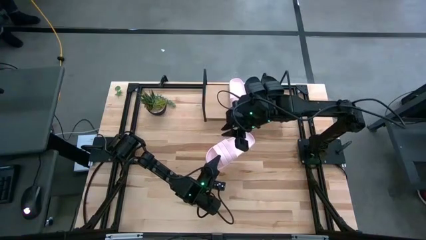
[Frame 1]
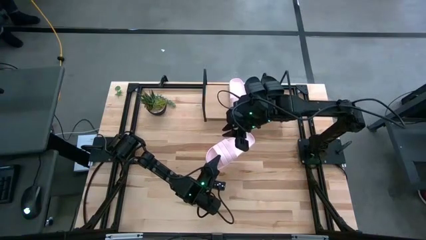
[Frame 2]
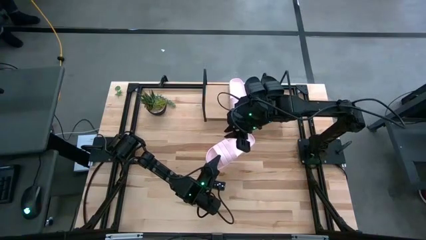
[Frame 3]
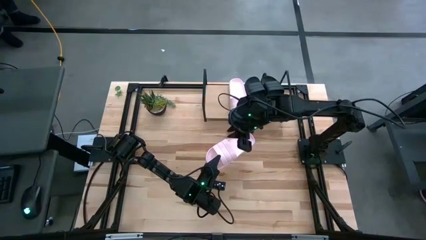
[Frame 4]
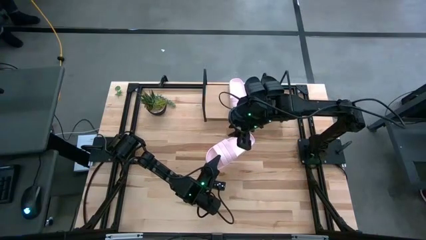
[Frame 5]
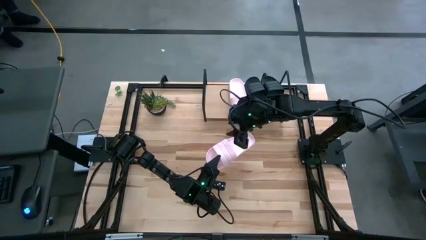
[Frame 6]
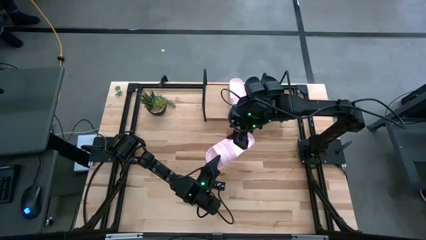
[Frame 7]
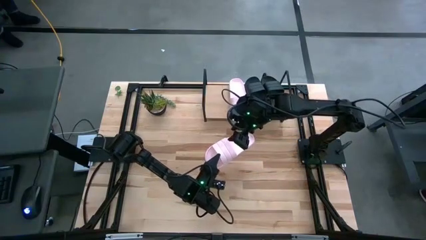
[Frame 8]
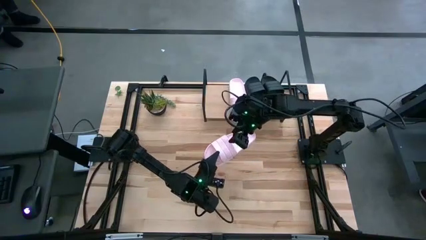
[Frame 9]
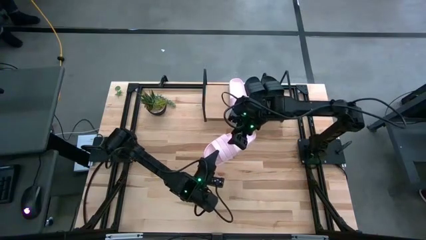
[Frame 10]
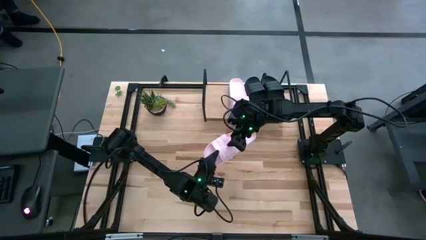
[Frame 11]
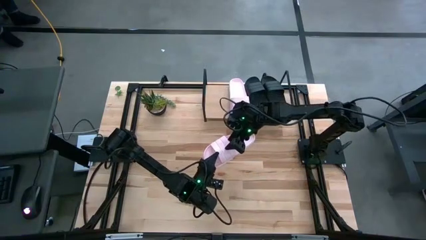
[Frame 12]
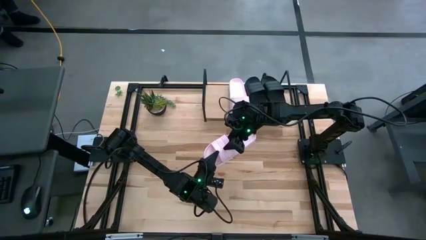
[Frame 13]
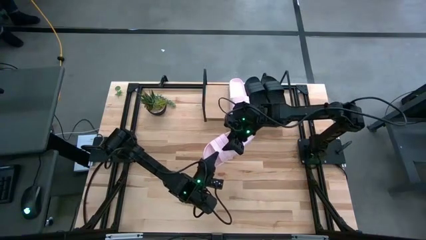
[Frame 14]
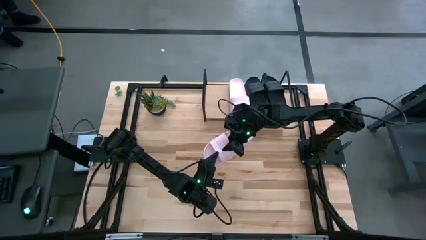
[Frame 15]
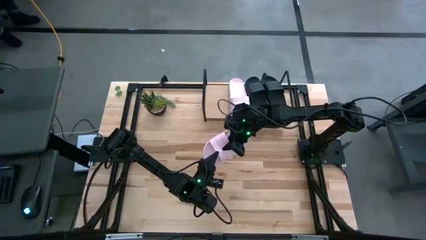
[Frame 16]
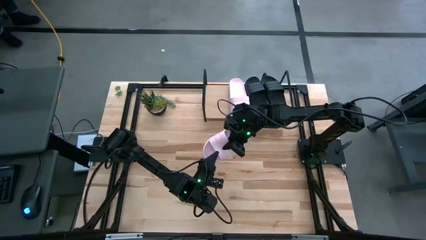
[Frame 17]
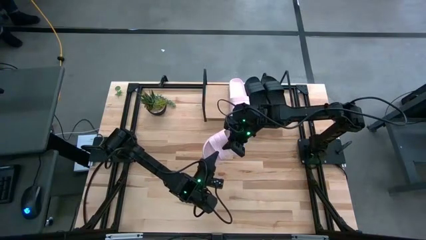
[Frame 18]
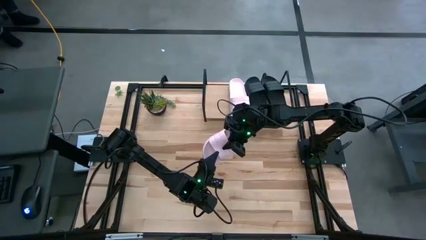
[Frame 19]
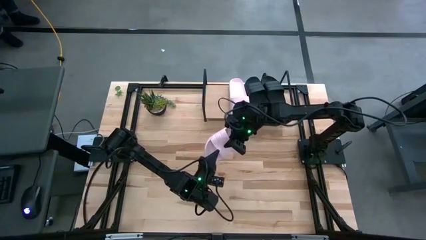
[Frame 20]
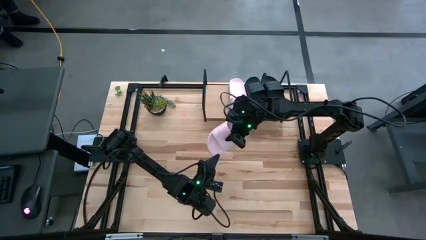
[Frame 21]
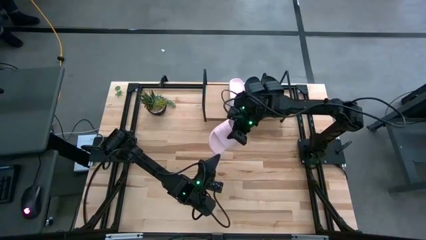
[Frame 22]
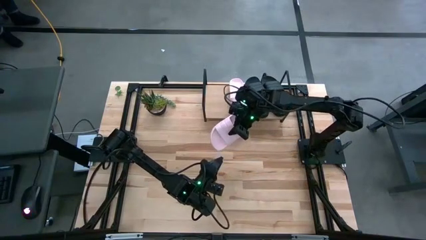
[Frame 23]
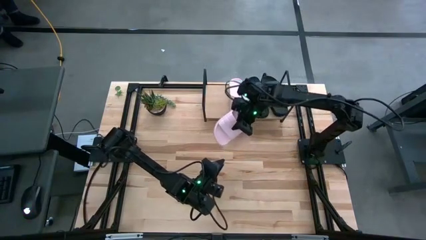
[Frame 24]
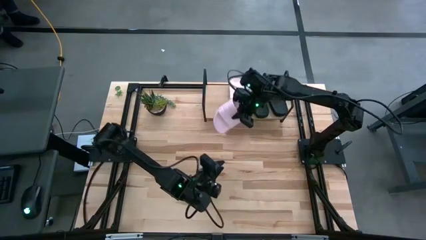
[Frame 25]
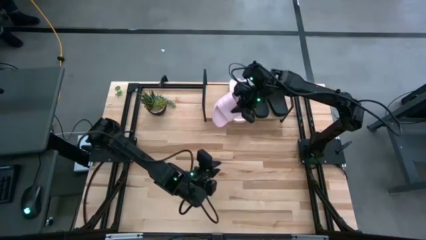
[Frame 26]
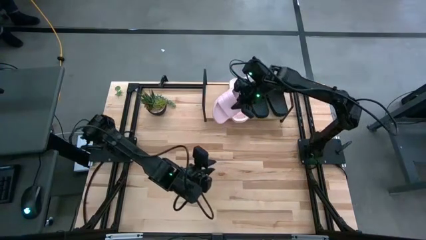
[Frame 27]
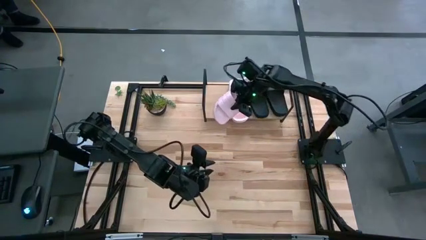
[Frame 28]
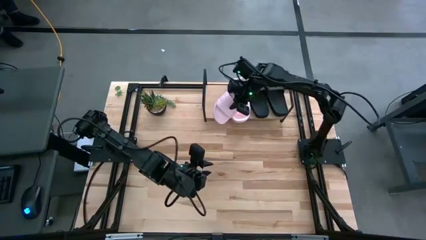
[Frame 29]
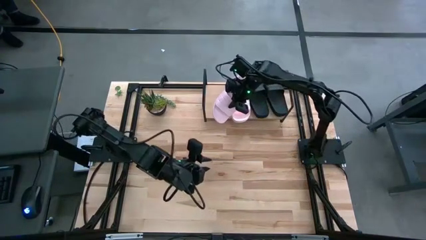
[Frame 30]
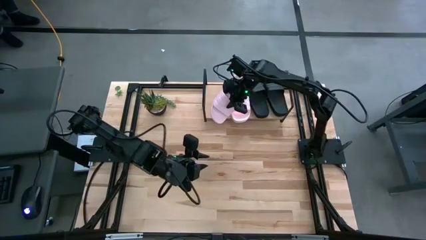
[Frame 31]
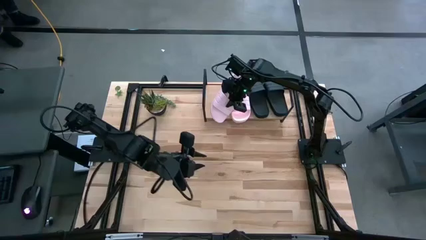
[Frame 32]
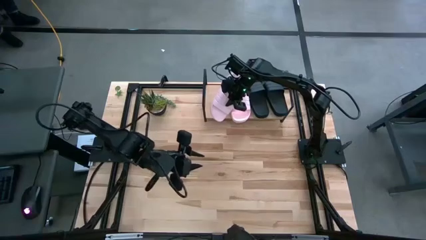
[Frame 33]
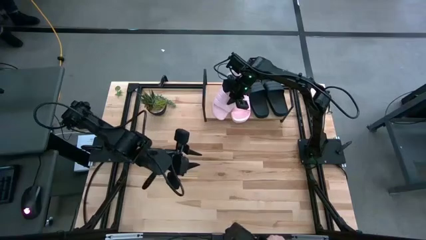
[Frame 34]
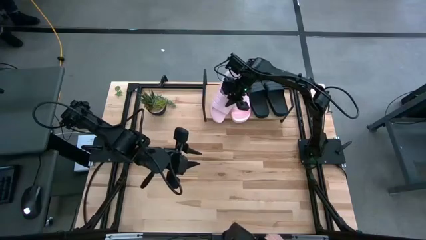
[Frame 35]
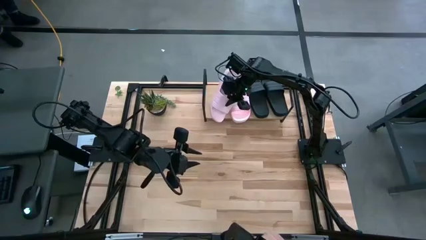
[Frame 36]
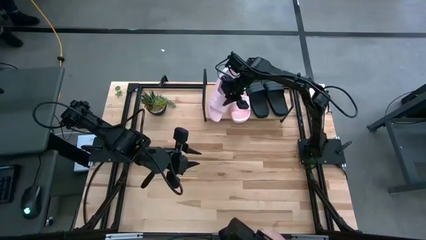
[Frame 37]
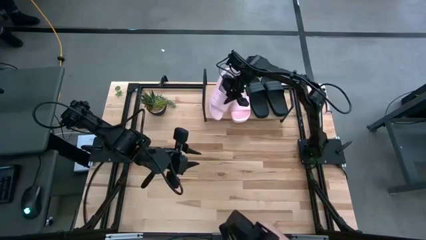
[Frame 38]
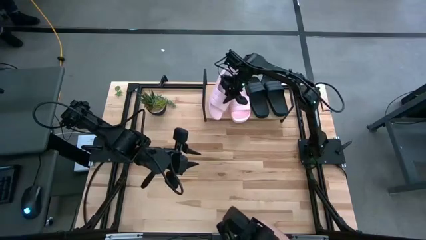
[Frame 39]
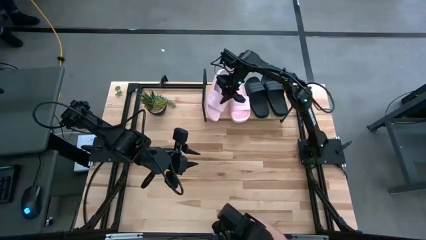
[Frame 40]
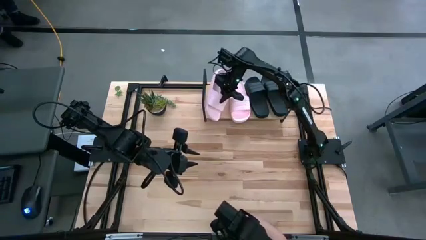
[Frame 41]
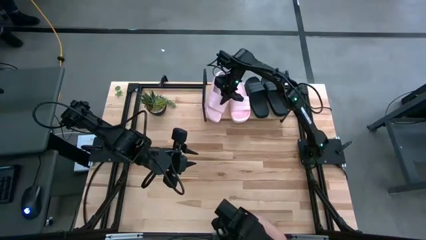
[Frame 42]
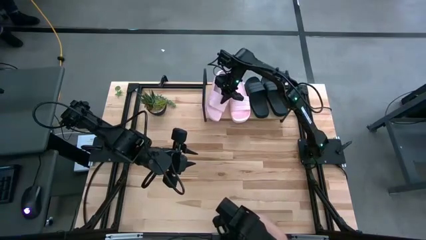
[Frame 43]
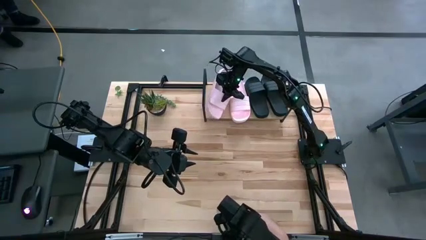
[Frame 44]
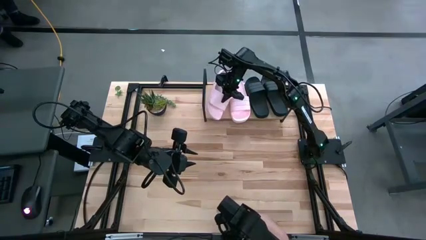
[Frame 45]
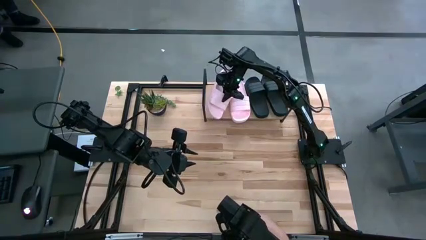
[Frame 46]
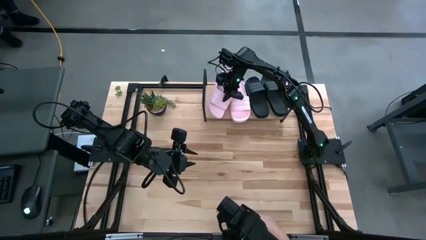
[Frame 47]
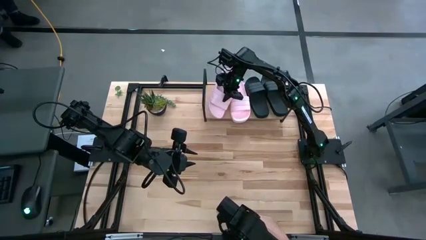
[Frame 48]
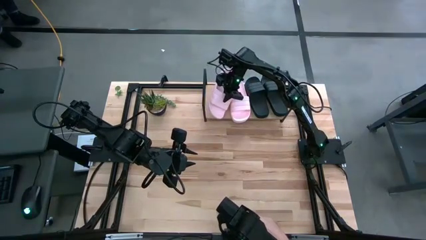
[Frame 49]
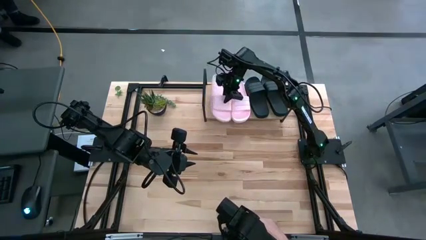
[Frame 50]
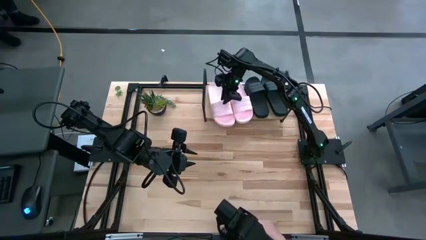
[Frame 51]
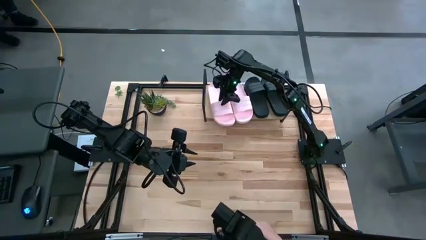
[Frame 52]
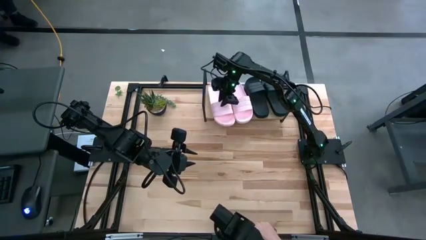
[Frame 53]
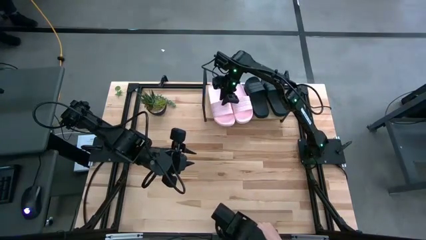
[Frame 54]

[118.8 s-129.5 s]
Task: Pick and place slides into the shelf
Put the pink slide on the shelf

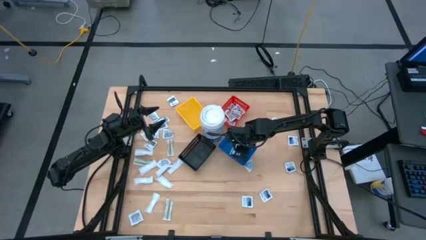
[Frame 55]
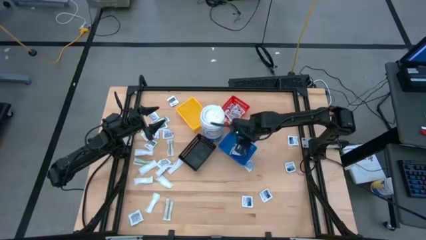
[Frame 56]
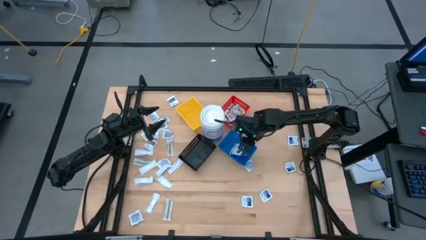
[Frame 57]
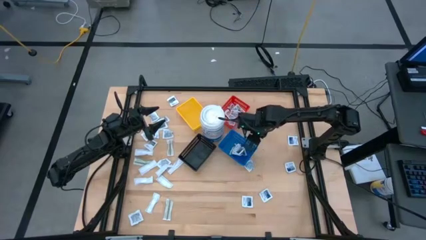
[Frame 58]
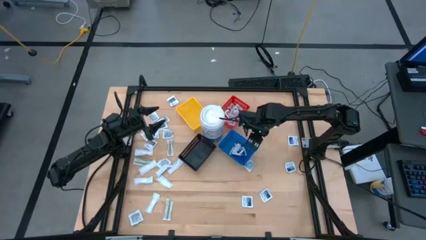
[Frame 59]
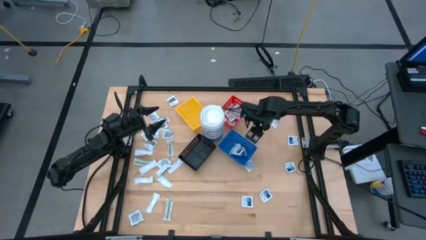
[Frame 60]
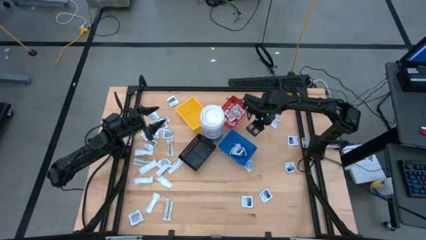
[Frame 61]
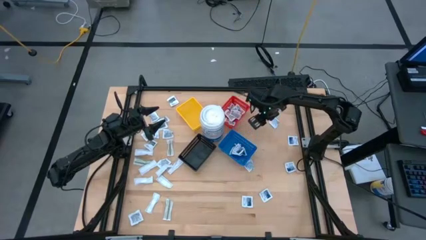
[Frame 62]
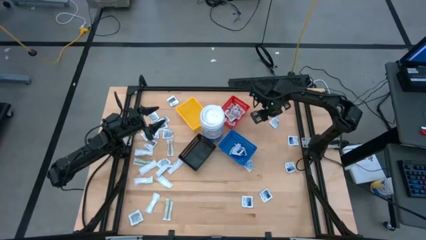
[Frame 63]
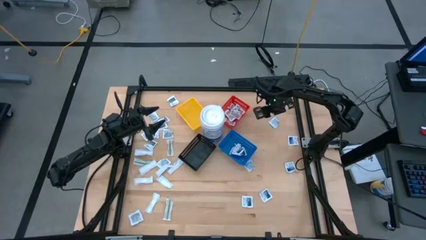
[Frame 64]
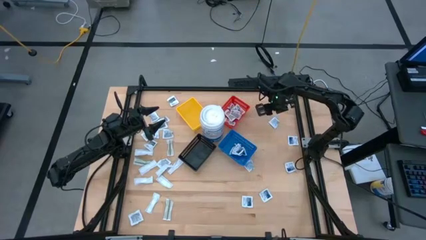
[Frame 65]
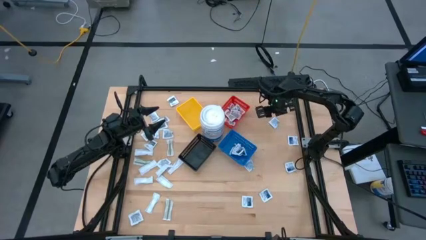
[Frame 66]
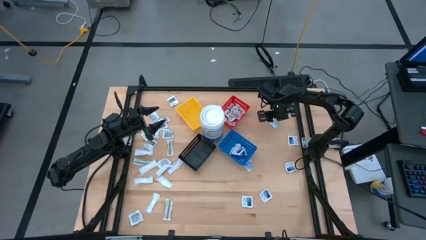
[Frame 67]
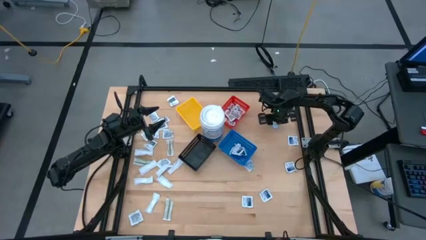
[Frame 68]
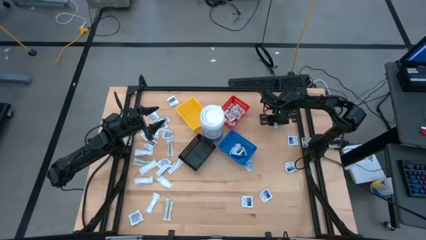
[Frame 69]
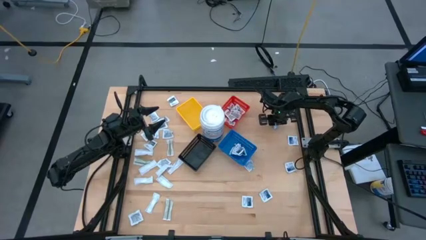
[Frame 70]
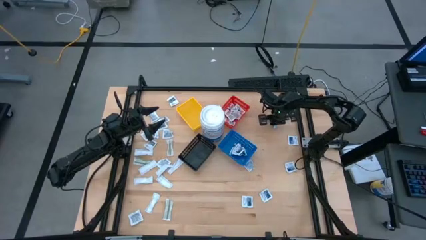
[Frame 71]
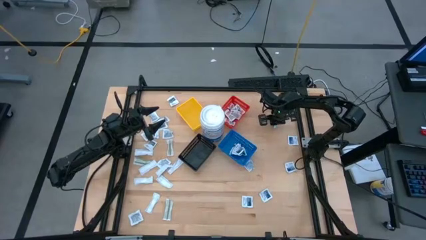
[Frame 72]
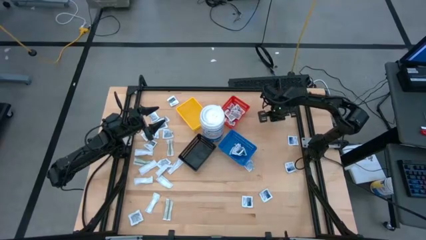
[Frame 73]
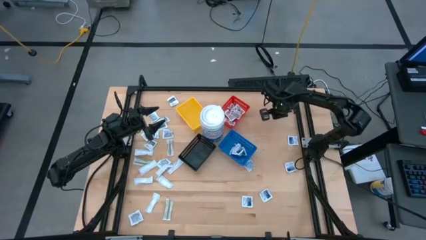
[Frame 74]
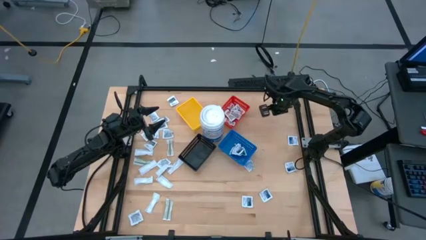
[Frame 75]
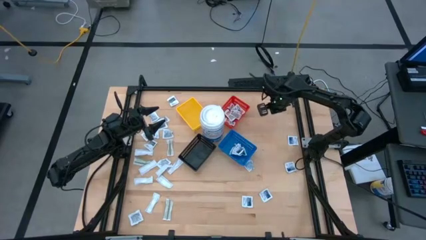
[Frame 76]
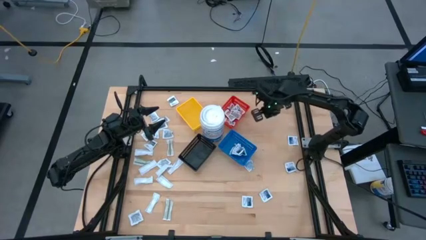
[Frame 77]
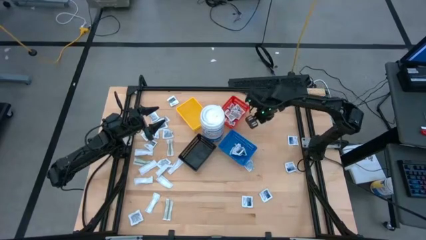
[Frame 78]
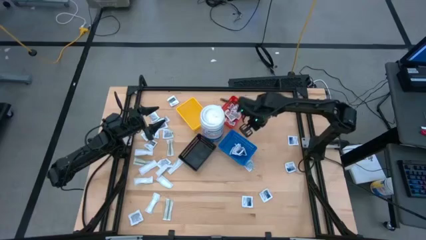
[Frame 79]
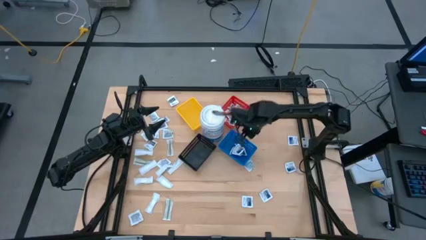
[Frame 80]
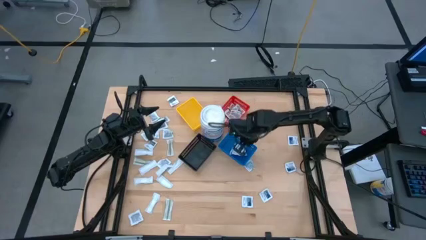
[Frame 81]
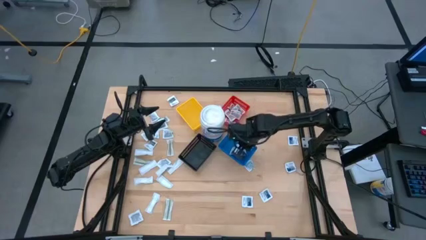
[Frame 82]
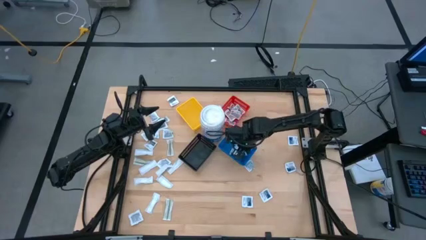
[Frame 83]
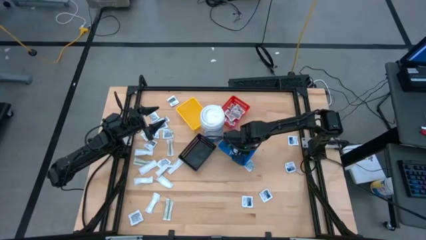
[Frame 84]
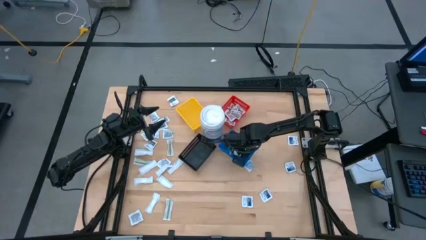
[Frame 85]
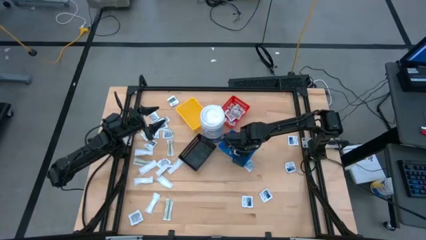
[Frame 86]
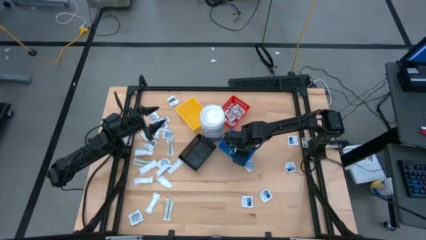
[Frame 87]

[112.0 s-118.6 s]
Task: Pick & Place First Aid Supplies
Put the alcohol pad into the blue bin
